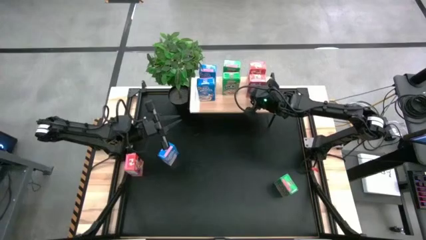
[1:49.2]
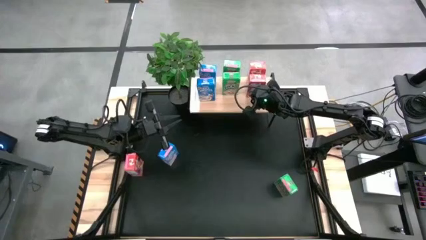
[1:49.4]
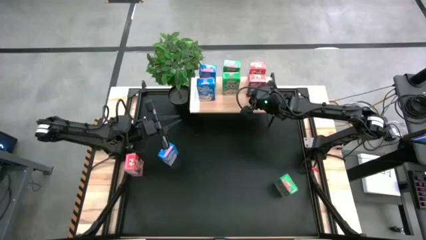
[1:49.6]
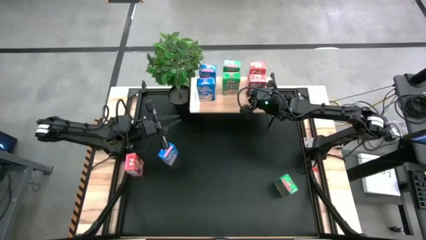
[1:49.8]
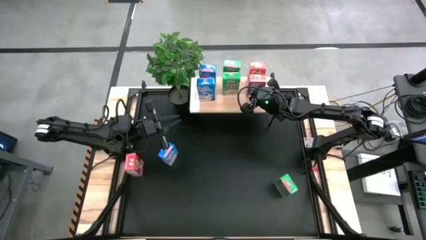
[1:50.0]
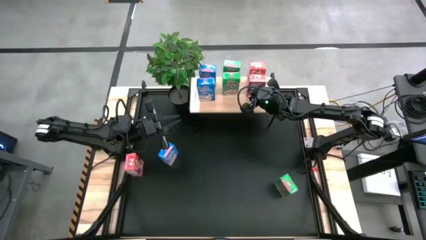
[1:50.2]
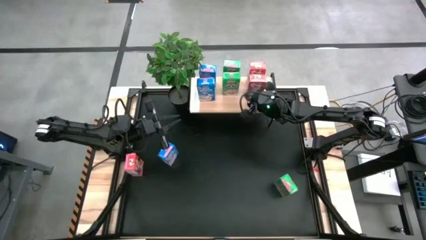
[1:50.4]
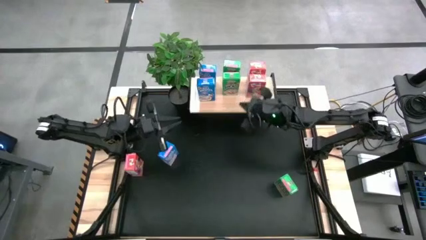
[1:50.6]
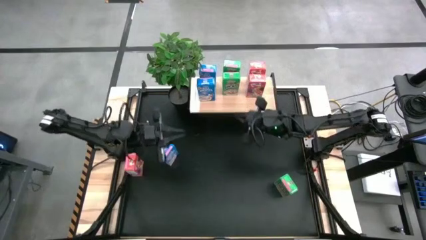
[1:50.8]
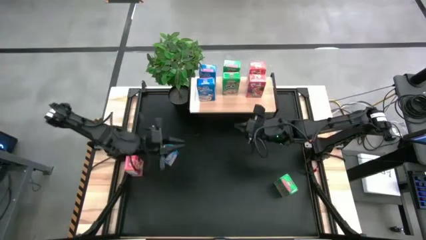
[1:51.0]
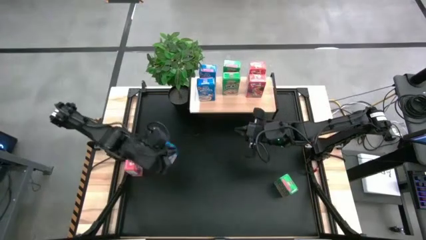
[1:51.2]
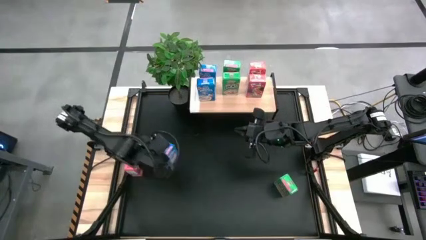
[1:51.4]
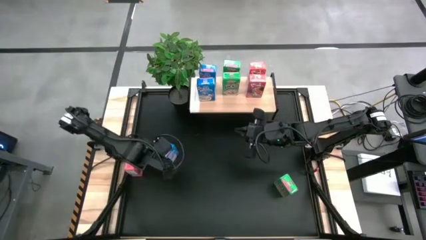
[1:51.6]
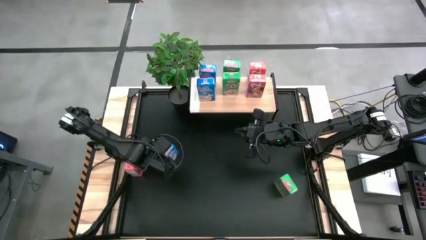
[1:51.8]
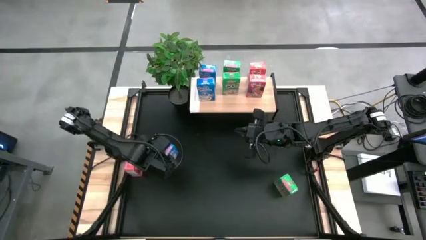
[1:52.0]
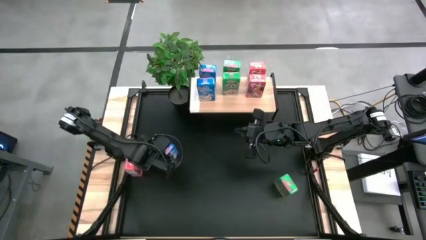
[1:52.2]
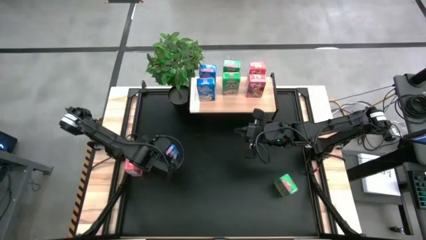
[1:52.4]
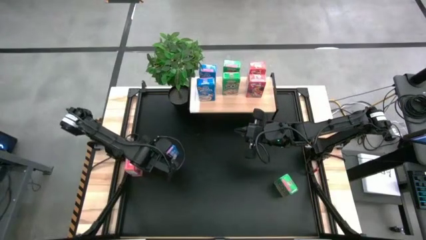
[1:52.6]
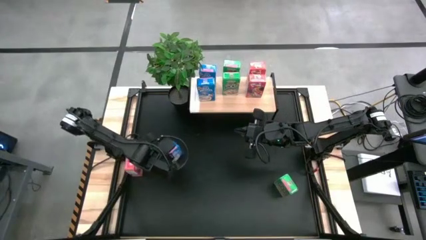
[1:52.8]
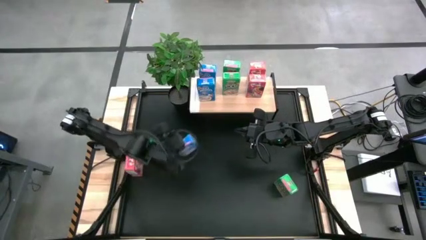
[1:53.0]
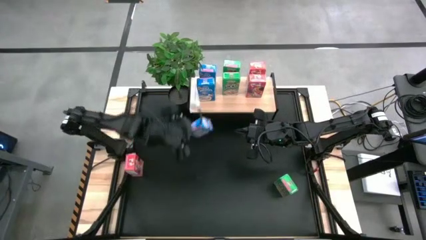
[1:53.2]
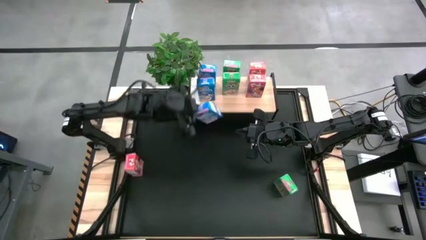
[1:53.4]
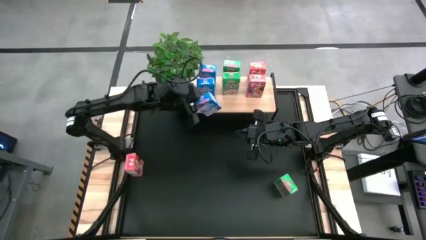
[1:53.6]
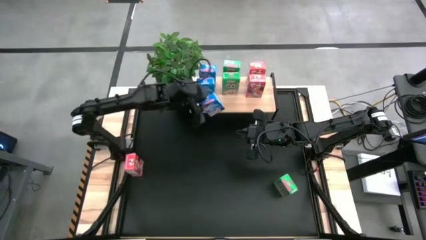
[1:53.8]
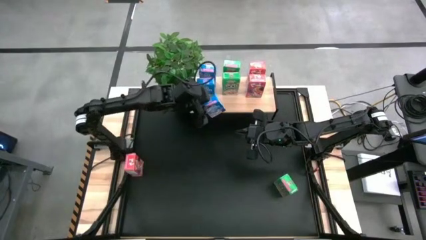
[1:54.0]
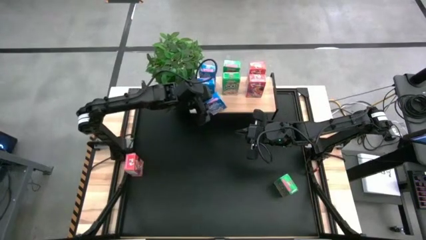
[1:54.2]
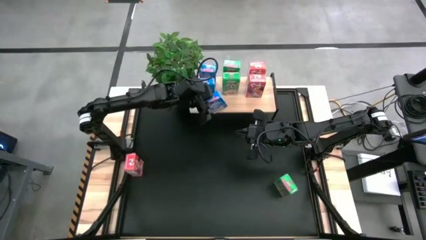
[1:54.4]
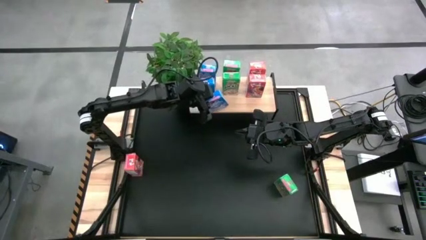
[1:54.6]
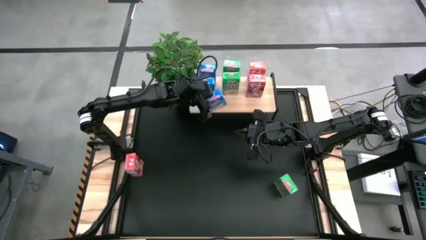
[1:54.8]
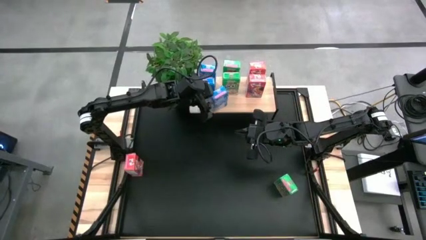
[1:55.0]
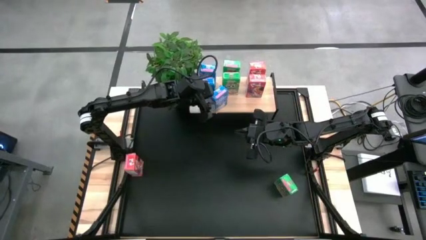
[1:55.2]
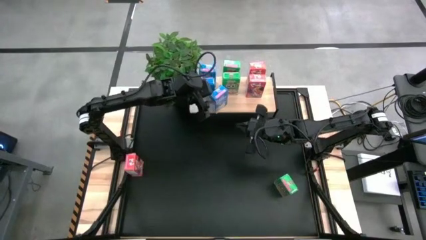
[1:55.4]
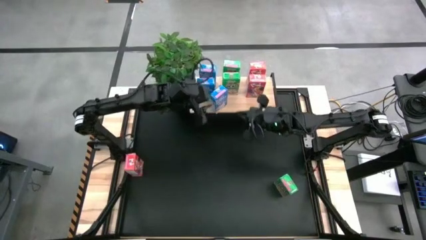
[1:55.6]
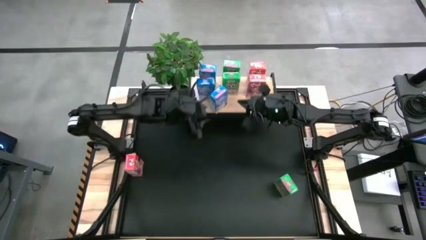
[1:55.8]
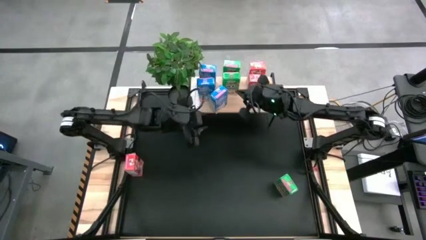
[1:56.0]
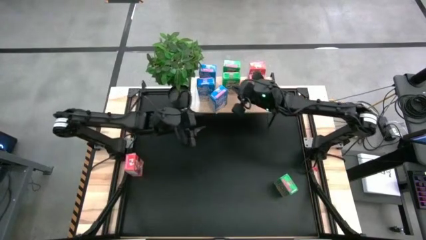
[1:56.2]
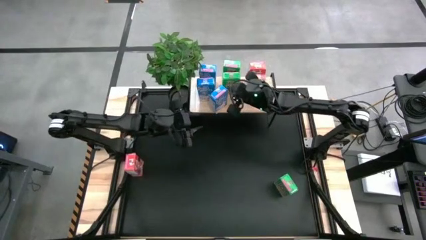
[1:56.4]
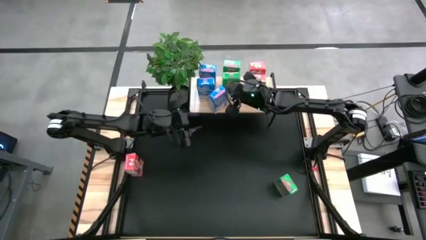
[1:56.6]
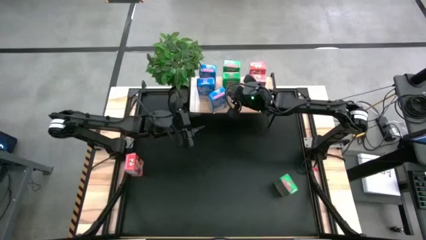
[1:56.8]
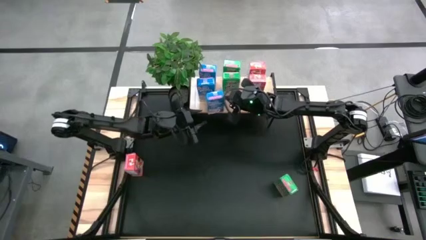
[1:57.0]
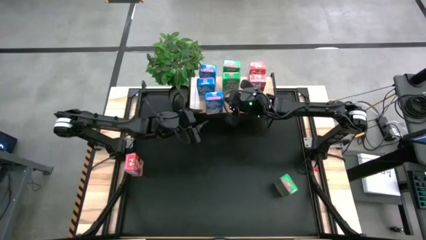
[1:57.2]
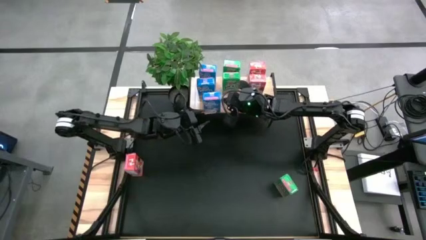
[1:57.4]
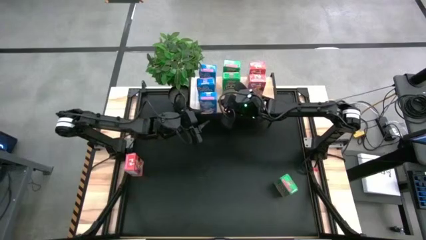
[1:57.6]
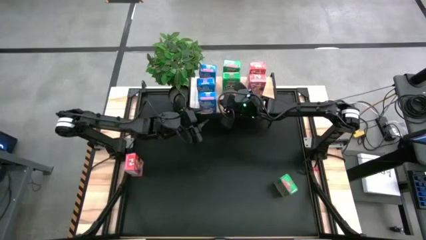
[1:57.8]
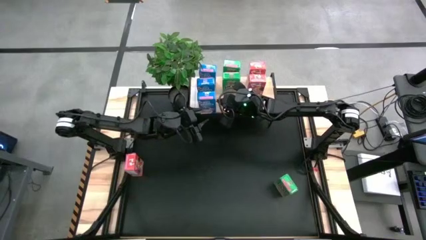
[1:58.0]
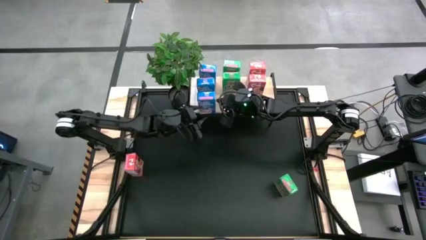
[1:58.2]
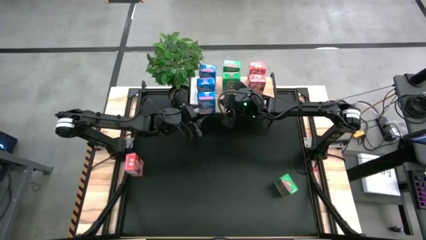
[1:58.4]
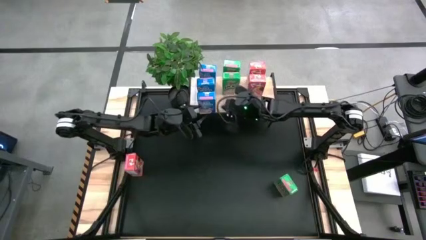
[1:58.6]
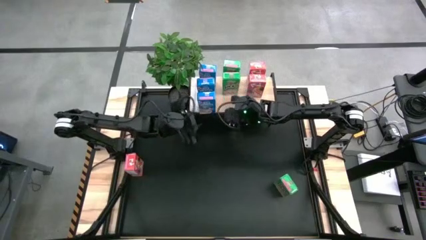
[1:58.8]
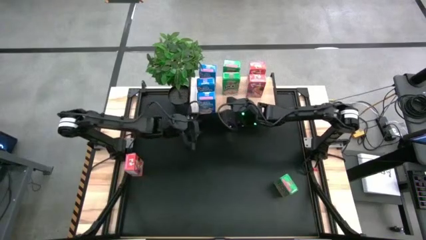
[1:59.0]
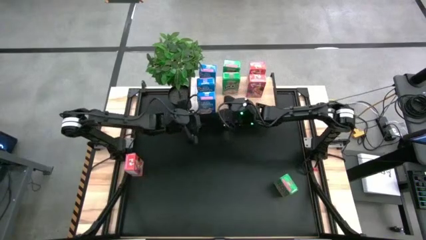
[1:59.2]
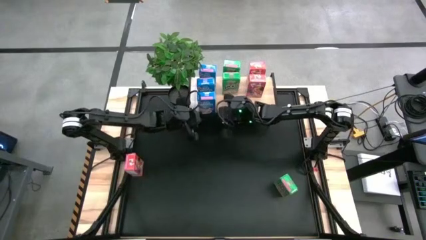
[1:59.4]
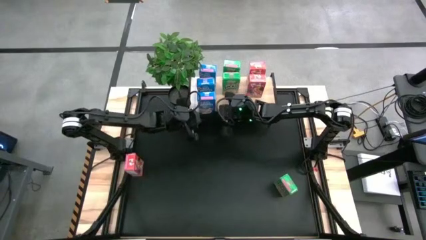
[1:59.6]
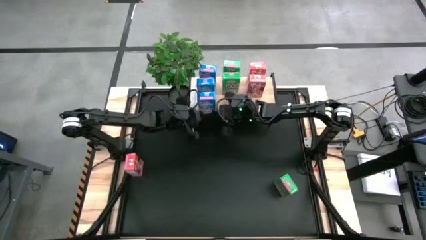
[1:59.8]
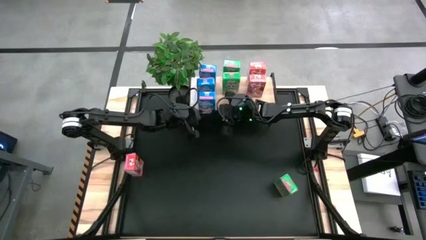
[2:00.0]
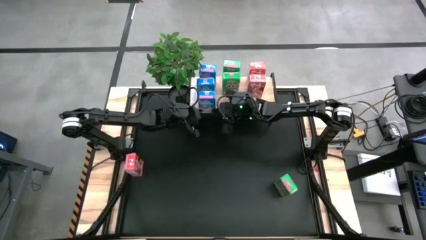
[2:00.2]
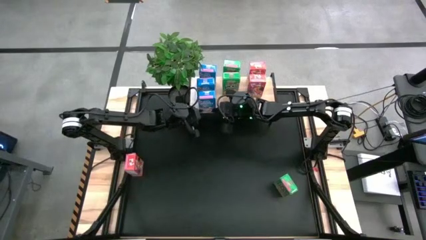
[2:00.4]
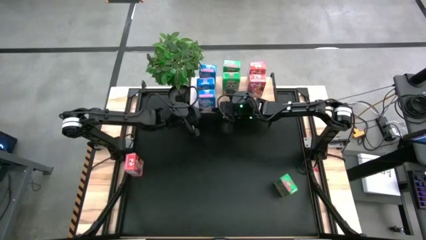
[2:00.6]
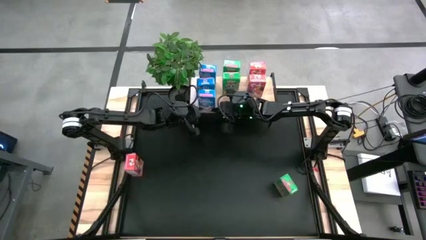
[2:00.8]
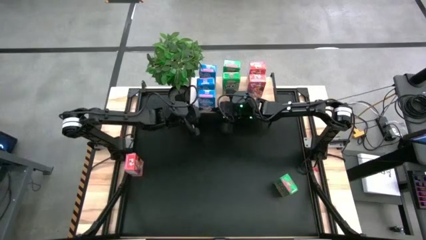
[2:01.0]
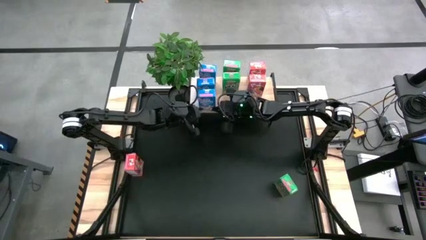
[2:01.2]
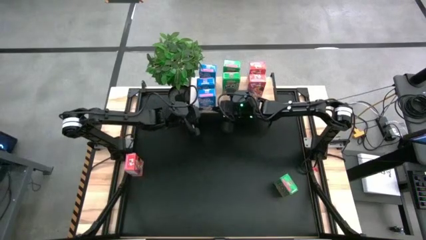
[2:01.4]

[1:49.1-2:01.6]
Task: Stack cereal on shelf
Put the blue cereal box on the shelf, aligned with the other blue cereal box

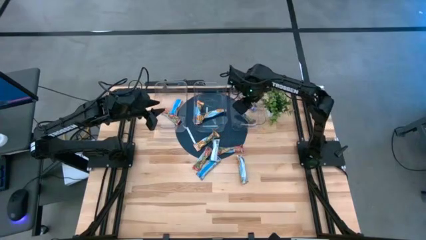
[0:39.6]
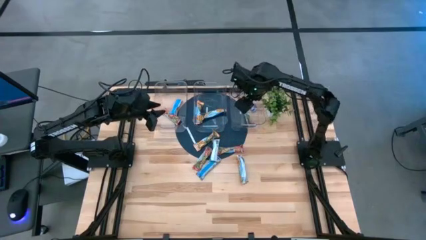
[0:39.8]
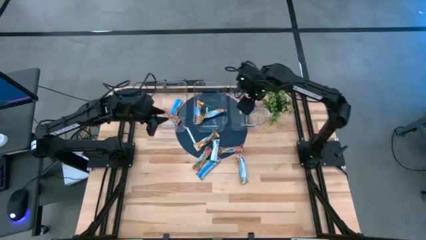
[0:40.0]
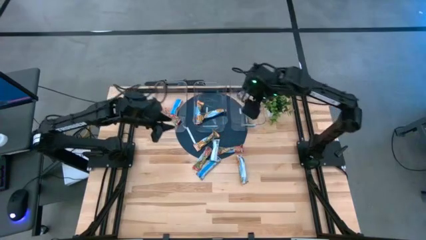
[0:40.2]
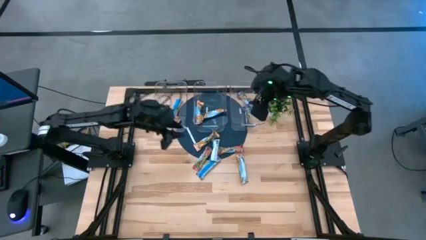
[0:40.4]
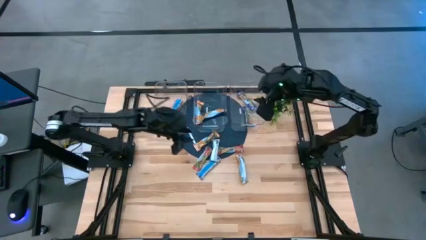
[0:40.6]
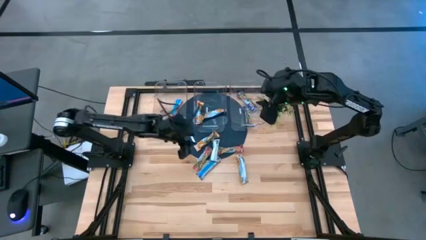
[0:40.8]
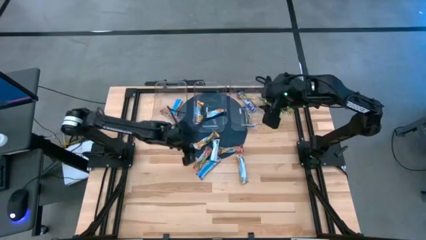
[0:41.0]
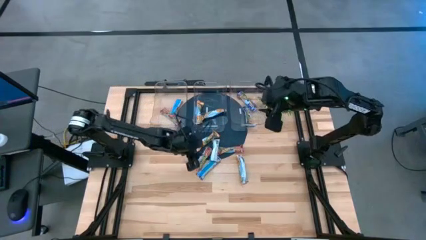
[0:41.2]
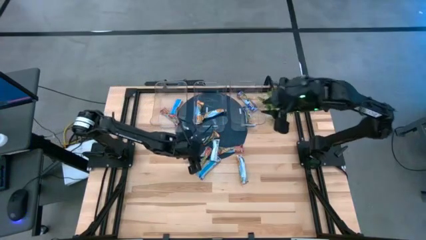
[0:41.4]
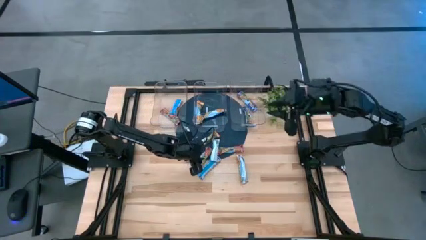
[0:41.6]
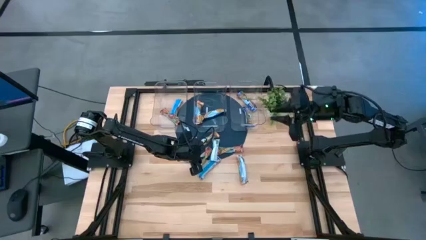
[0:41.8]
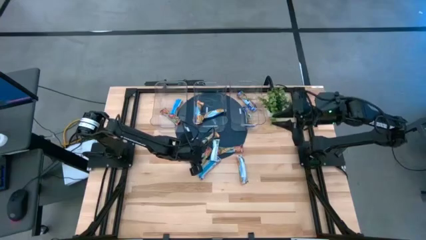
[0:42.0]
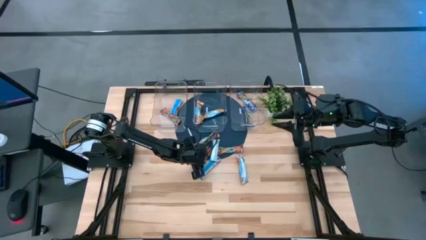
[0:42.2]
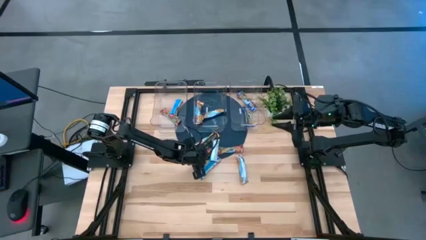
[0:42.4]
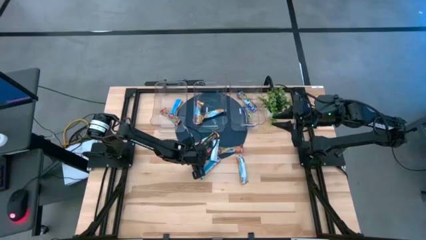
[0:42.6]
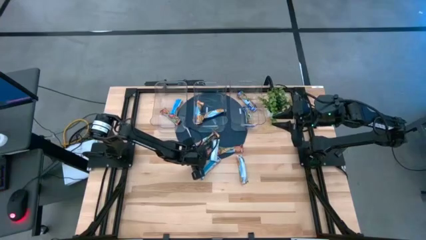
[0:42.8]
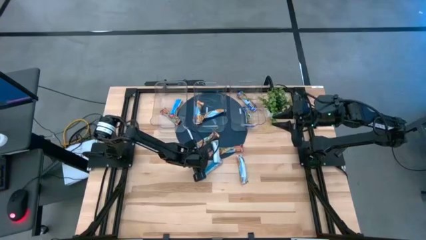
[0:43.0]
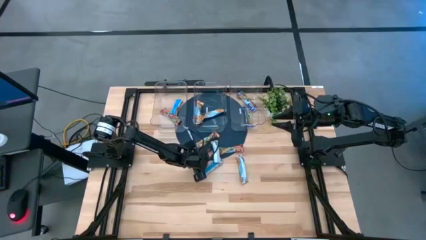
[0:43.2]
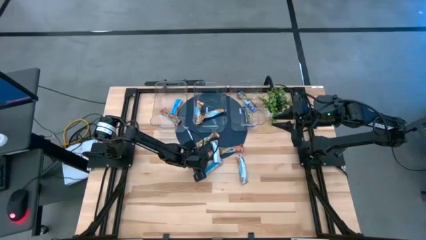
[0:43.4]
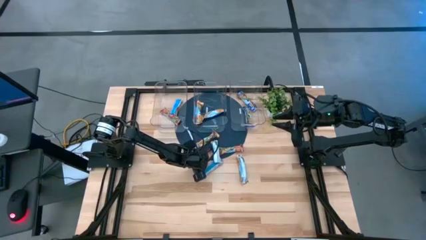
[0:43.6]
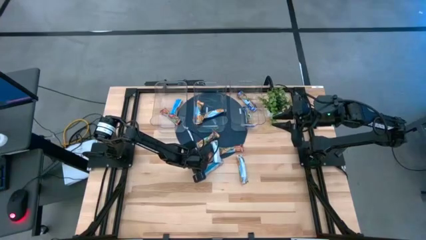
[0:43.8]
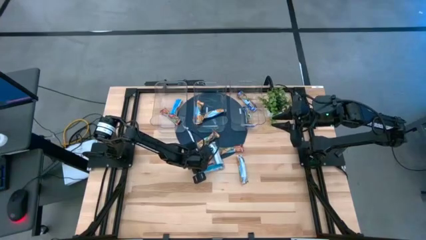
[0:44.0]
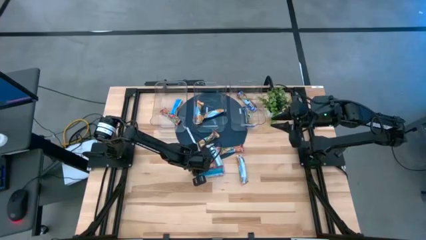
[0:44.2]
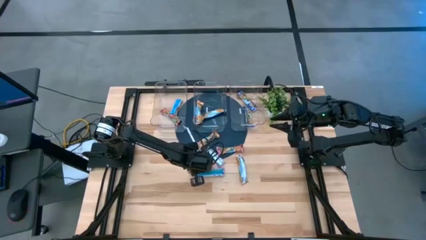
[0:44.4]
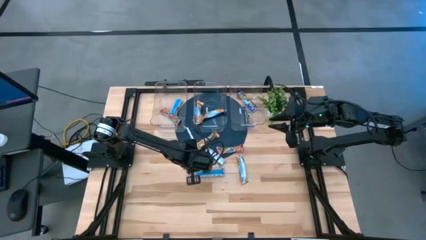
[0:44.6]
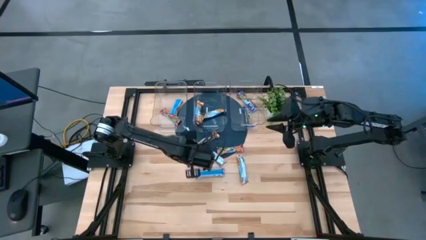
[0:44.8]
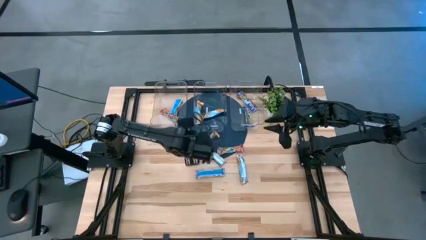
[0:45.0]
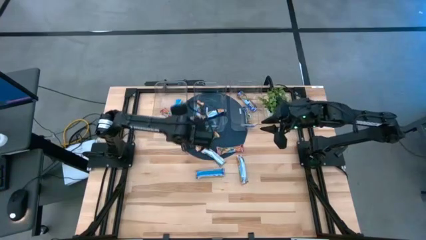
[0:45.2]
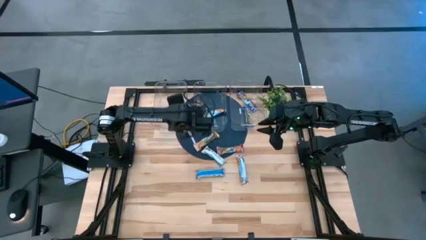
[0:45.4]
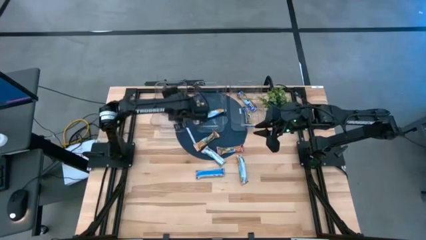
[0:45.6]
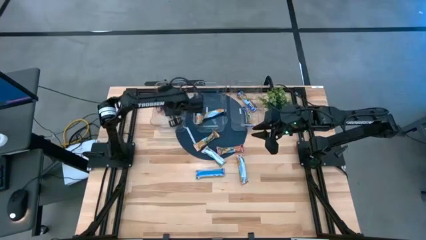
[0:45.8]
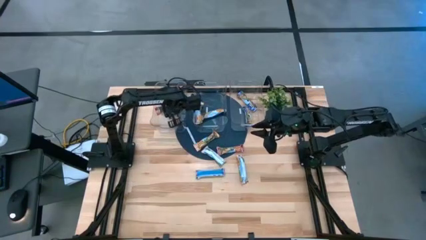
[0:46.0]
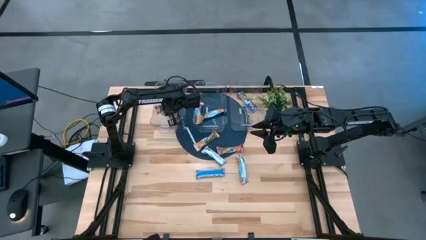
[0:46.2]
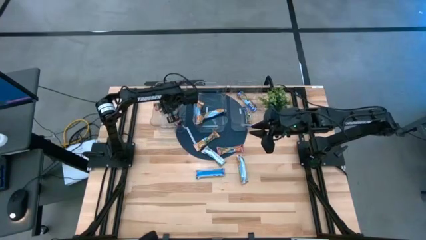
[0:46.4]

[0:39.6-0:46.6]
Task: Pick and place Granola Bars by type
Put the red granola bar into the left transparent bin
